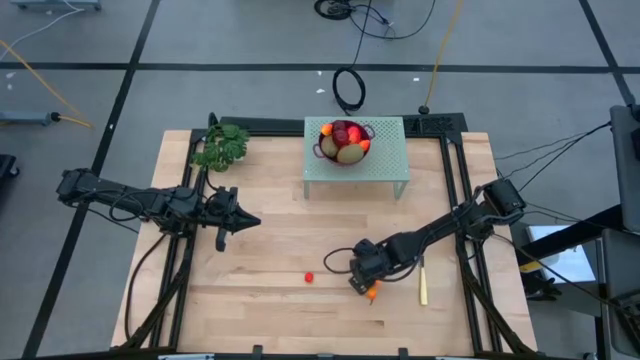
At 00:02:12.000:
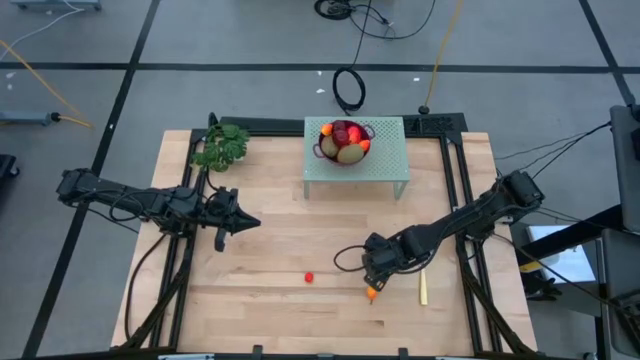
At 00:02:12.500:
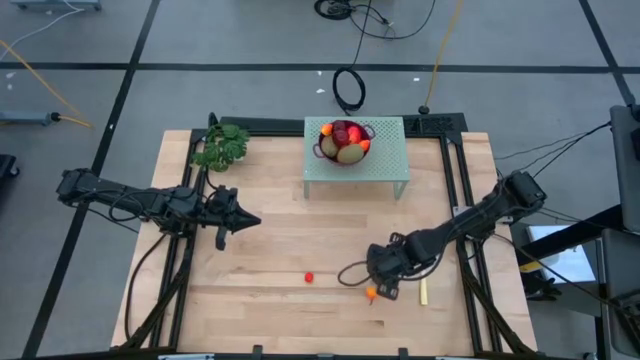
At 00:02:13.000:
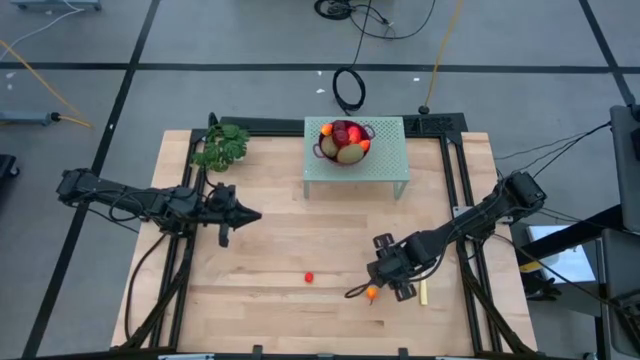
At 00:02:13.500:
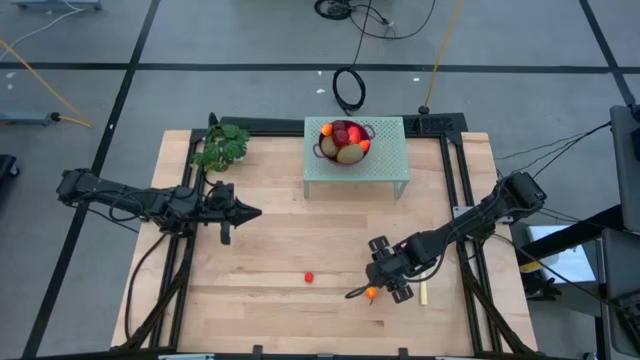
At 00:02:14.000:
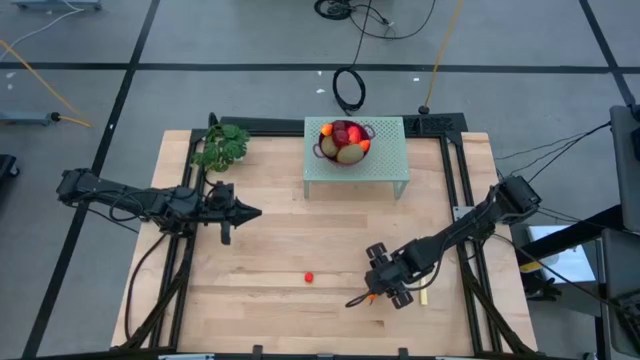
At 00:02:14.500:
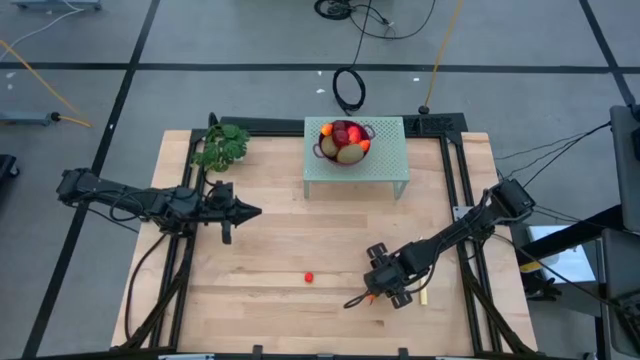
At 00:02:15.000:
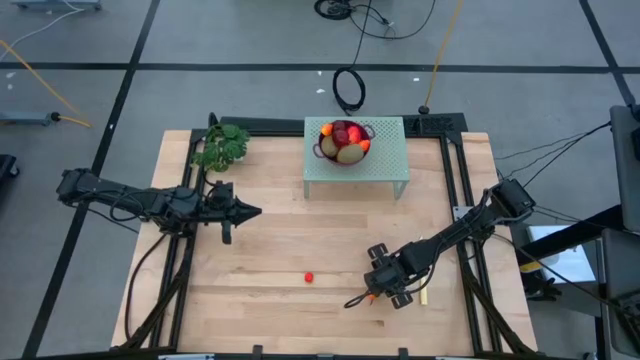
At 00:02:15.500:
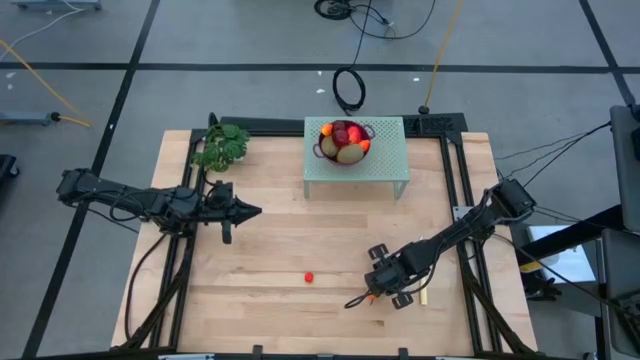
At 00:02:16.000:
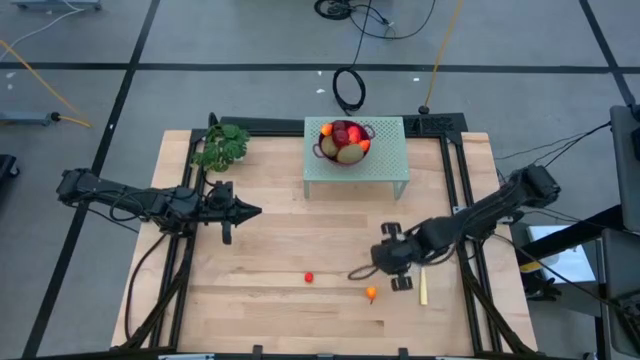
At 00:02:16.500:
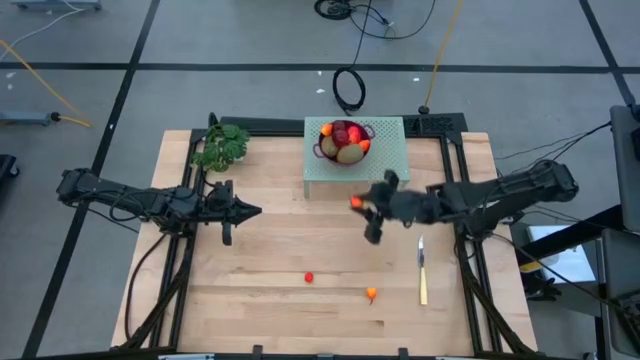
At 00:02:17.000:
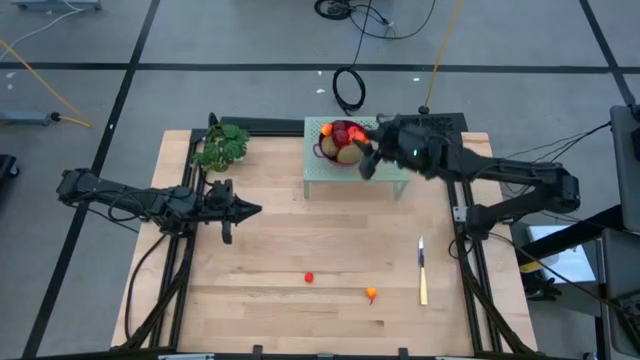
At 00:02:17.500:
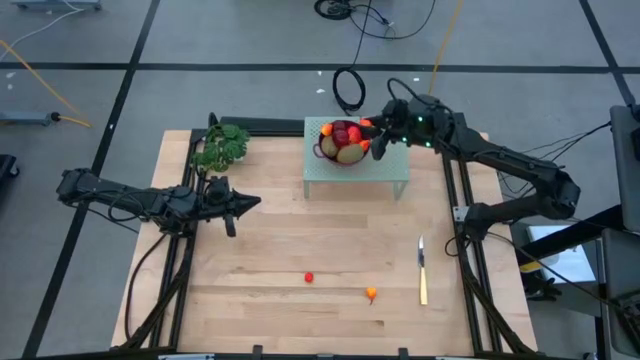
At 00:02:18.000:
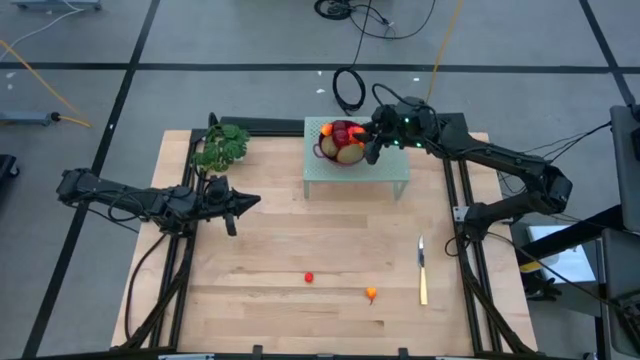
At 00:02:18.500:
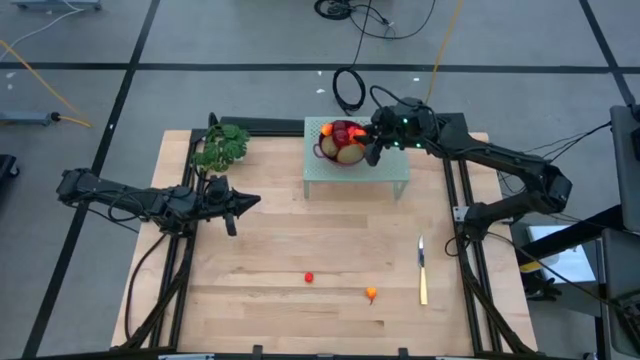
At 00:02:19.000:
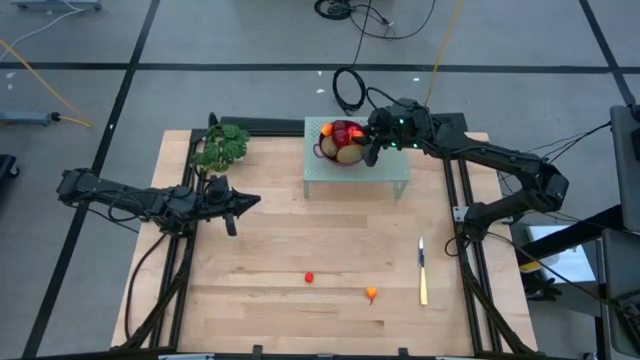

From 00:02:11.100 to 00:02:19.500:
Task: Pick & Place Fruit
Put the pear into the strainer bowl

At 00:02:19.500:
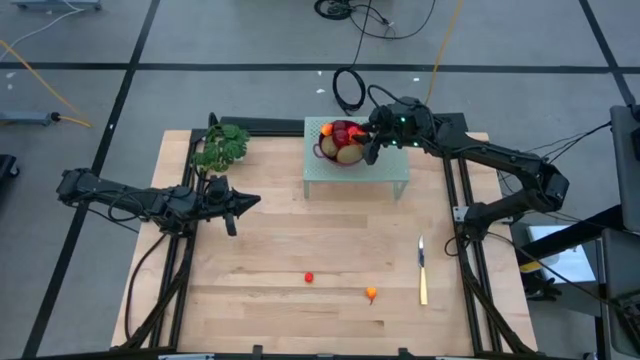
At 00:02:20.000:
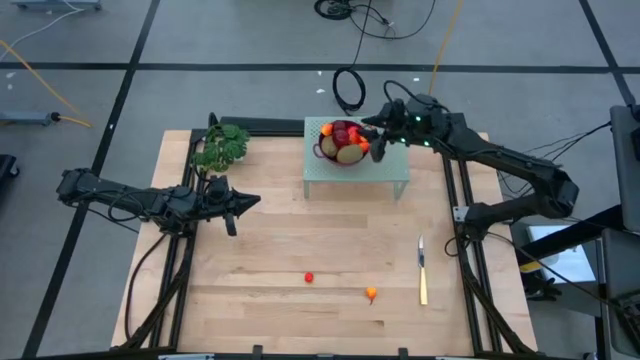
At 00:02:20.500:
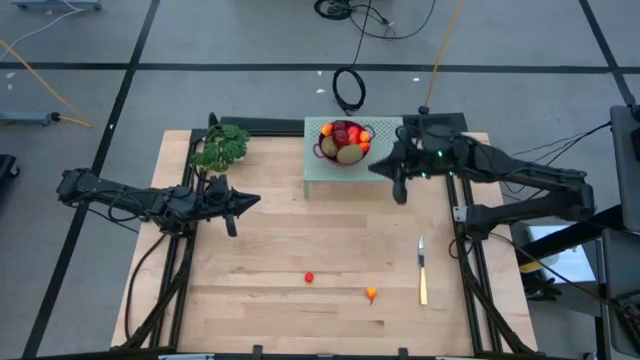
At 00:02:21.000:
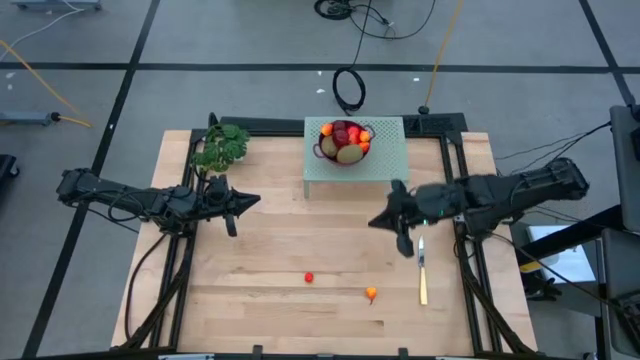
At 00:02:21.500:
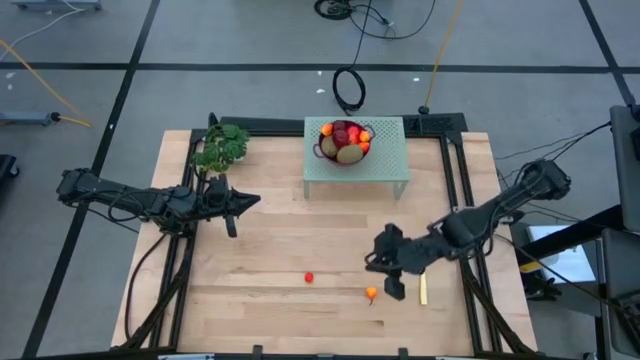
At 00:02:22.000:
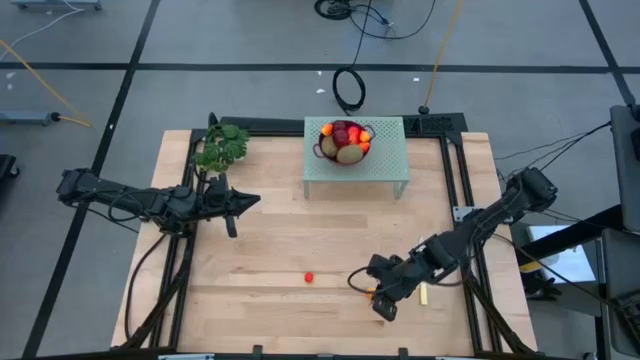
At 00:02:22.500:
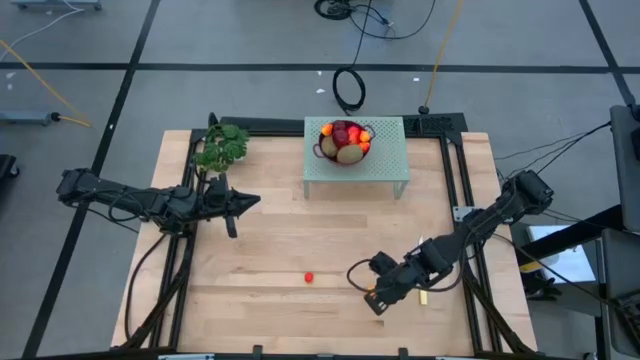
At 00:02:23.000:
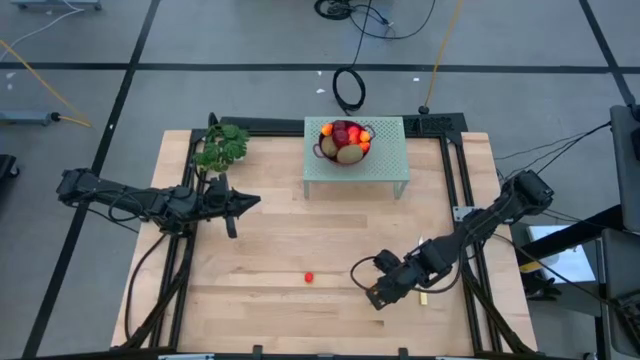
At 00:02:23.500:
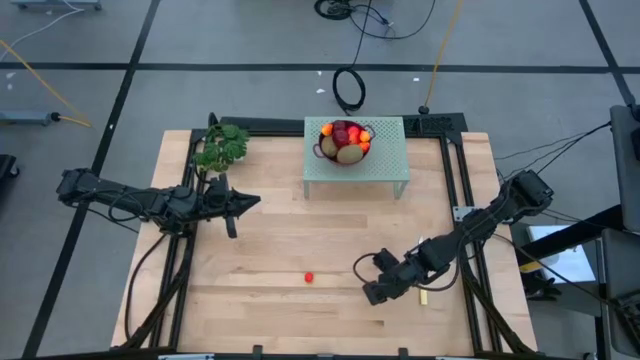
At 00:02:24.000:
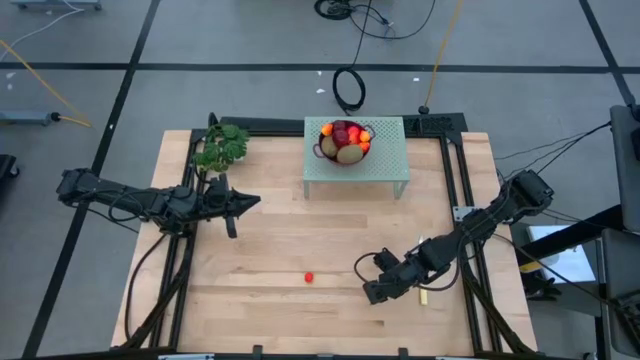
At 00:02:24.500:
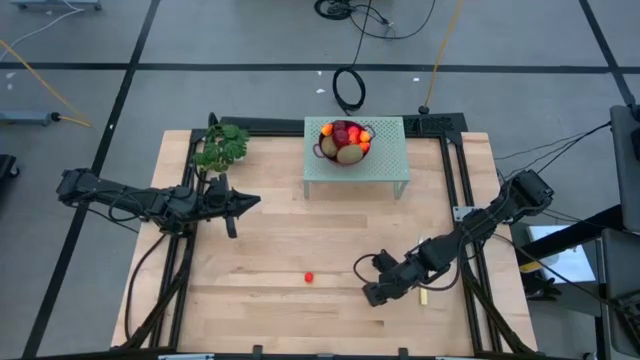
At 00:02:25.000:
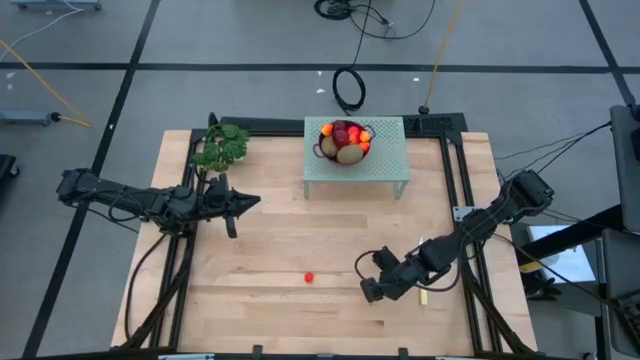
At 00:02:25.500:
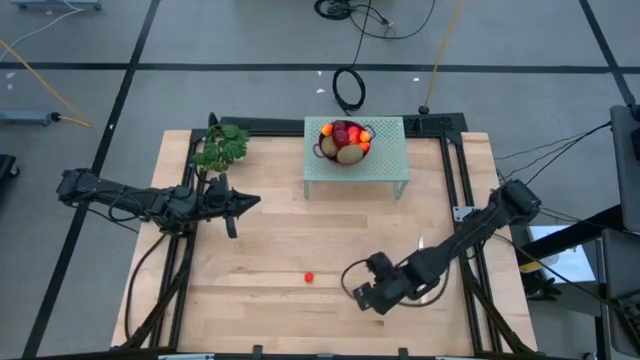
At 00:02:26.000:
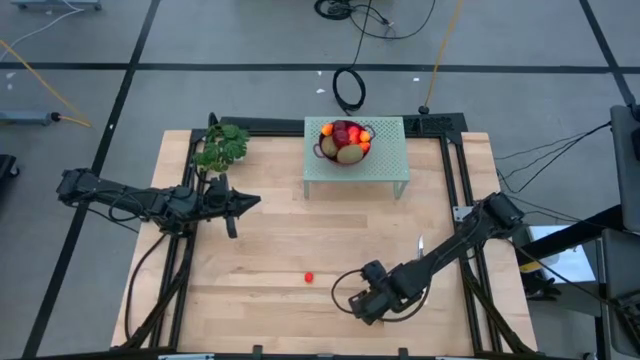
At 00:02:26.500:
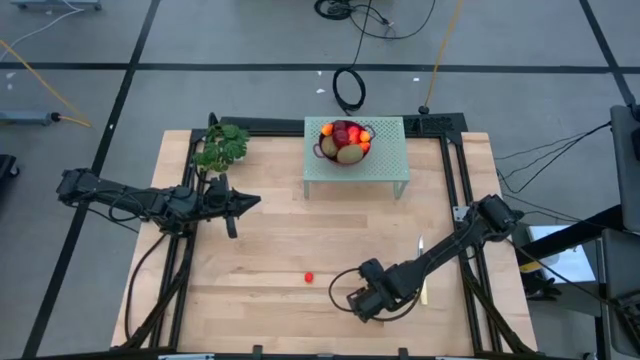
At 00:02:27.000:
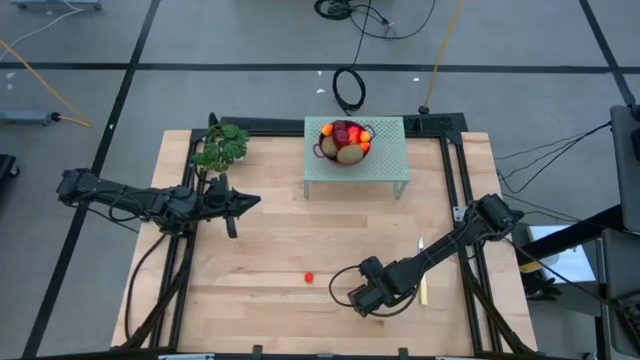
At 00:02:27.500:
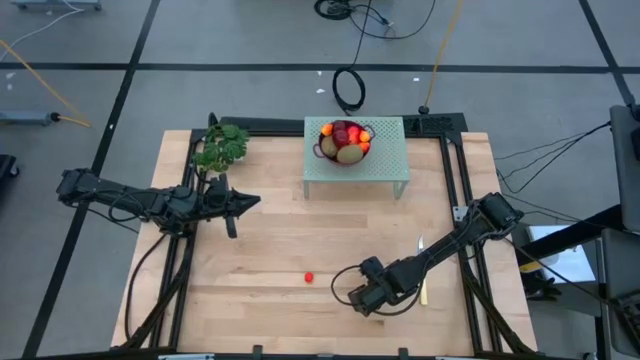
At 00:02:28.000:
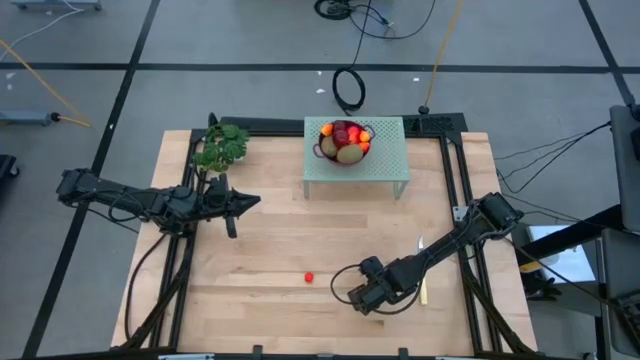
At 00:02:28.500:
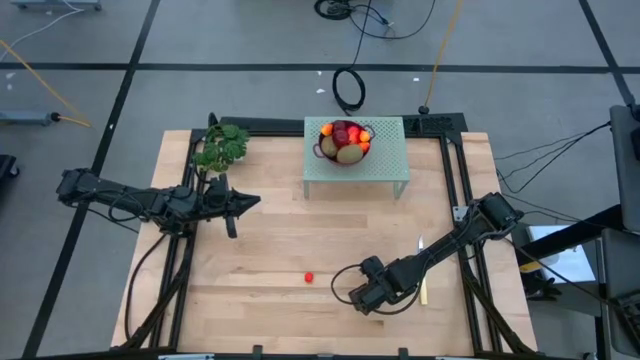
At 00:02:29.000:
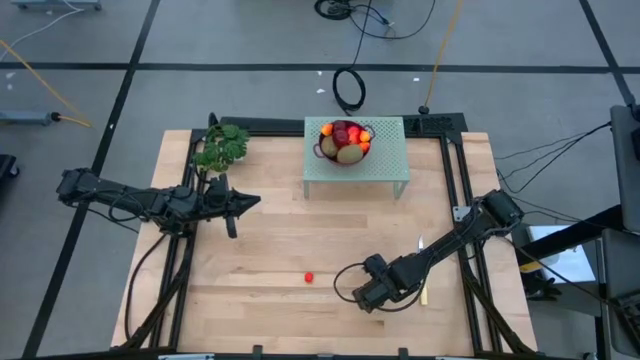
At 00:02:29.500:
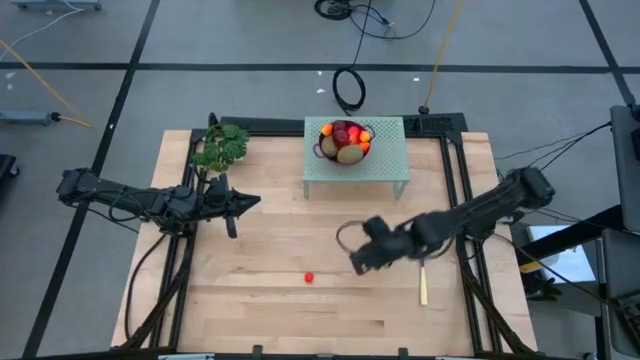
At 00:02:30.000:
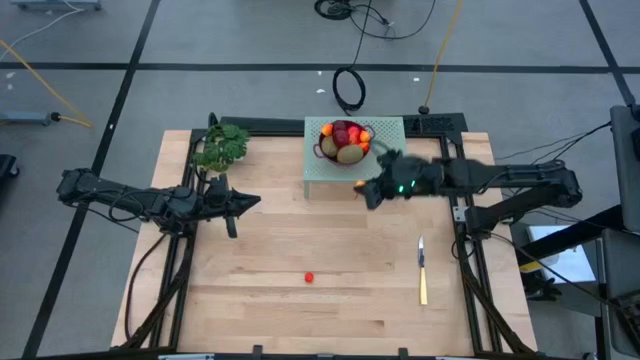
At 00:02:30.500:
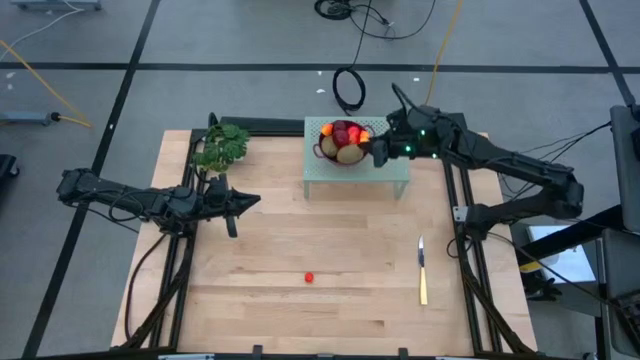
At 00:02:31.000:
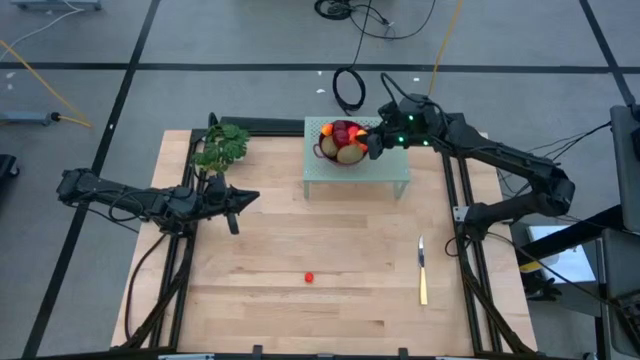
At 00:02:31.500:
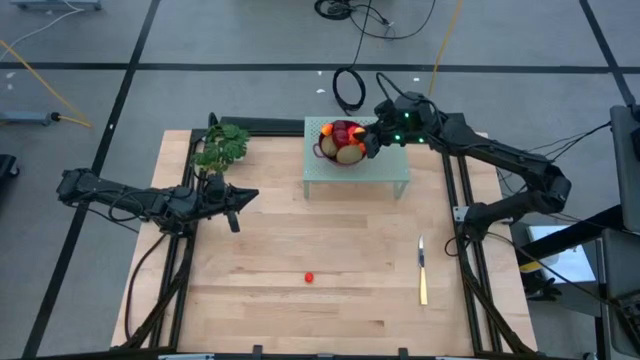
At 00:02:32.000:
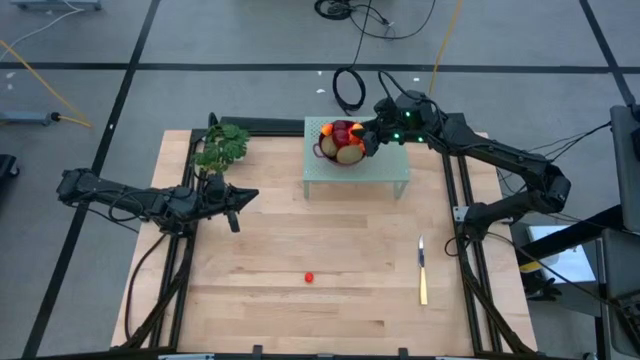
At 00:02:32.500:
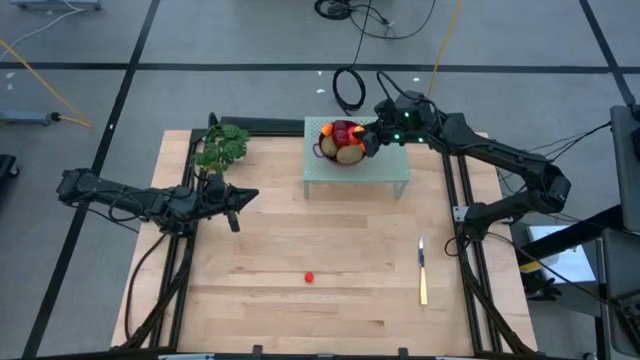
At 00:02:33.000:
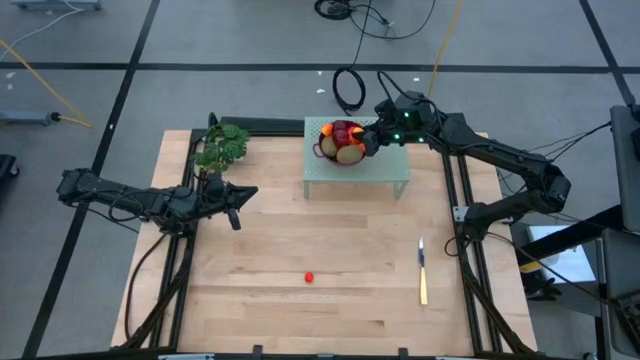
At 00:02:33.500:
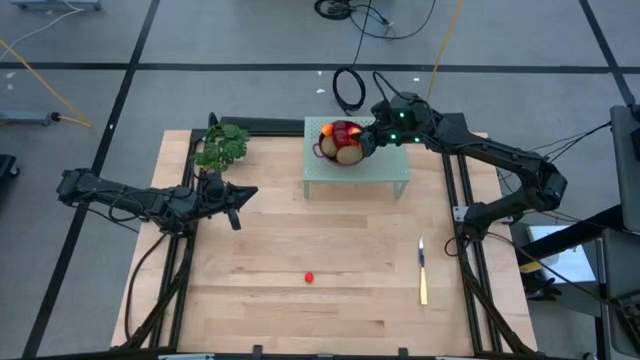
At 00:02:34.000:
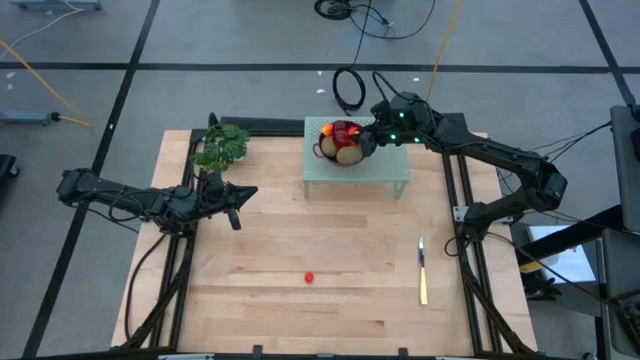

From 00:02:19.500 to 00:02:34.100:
Put the pear into the strainer bowl
